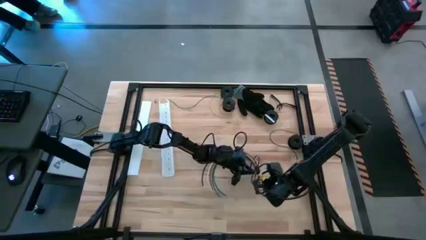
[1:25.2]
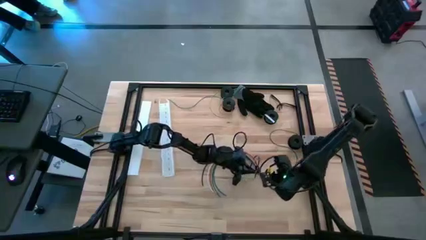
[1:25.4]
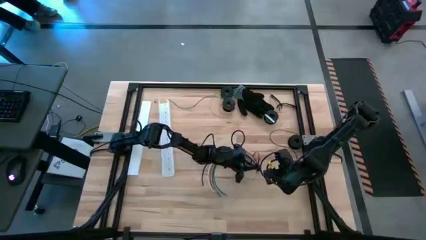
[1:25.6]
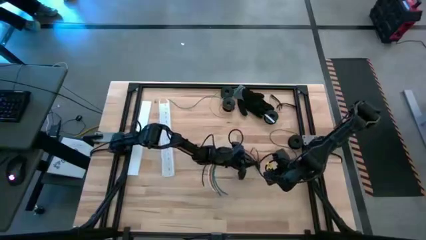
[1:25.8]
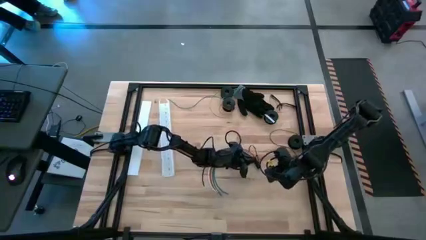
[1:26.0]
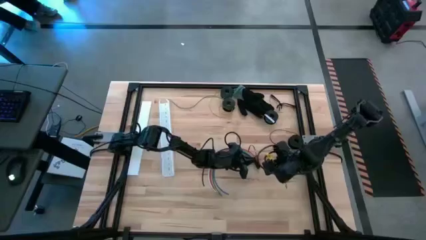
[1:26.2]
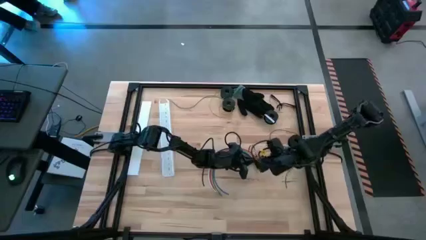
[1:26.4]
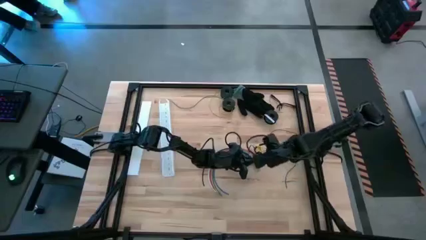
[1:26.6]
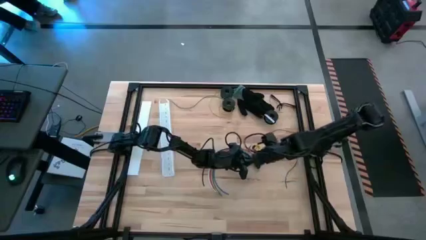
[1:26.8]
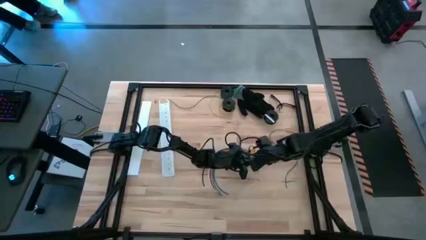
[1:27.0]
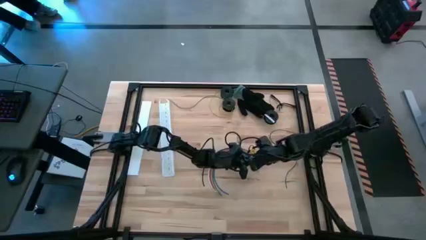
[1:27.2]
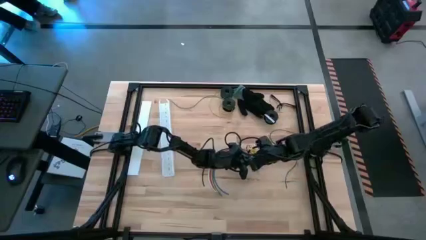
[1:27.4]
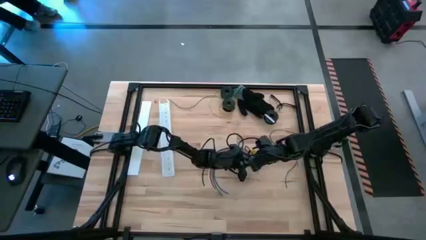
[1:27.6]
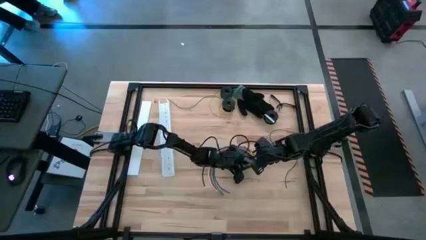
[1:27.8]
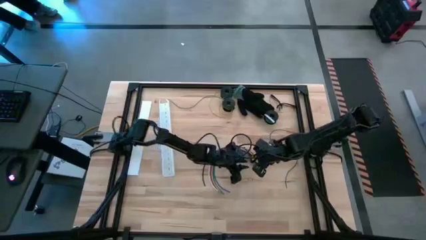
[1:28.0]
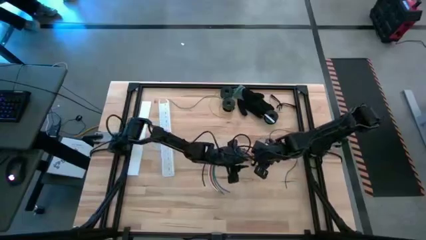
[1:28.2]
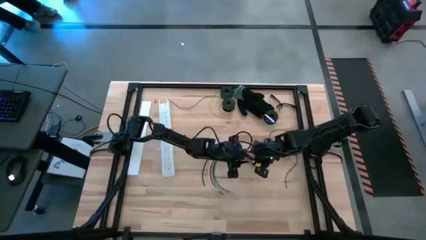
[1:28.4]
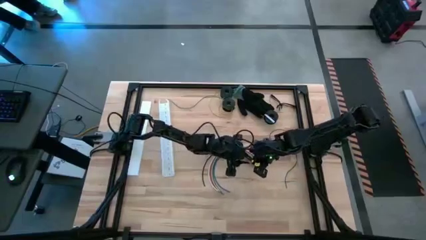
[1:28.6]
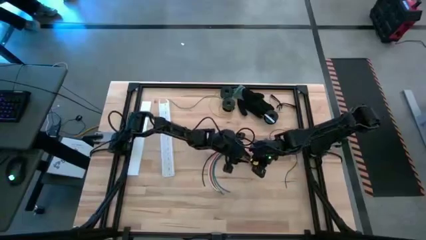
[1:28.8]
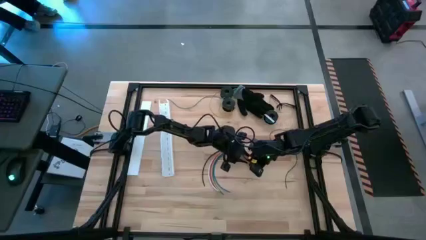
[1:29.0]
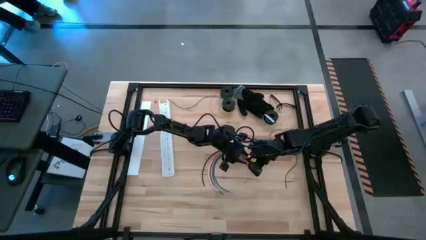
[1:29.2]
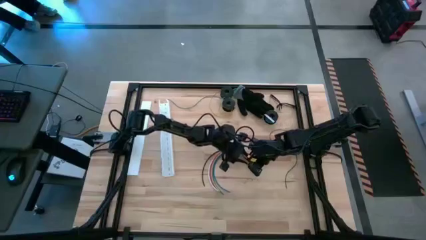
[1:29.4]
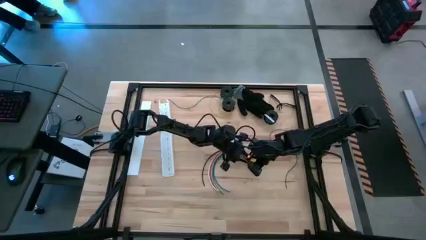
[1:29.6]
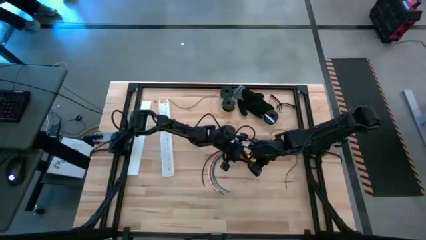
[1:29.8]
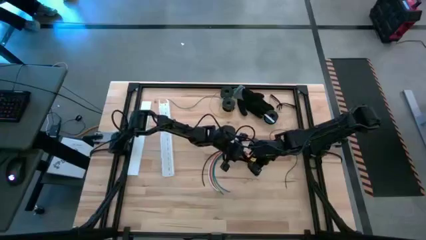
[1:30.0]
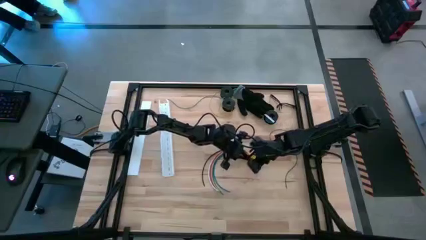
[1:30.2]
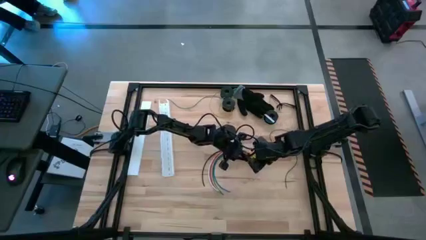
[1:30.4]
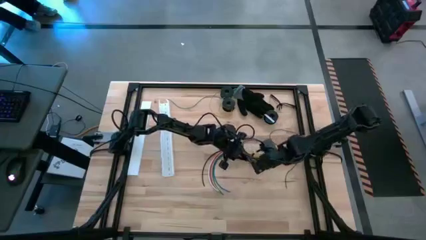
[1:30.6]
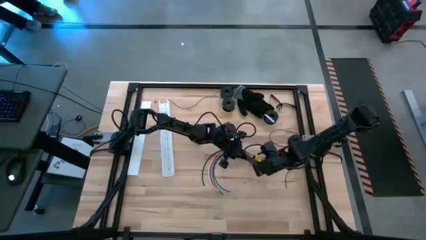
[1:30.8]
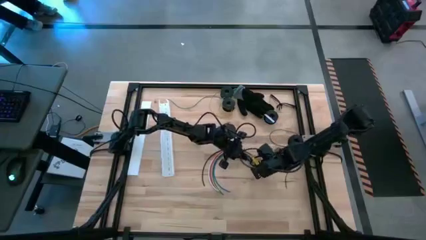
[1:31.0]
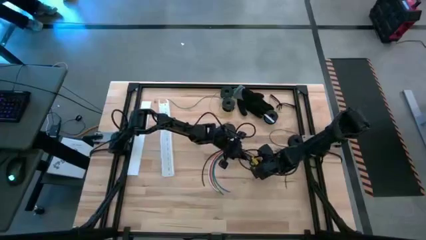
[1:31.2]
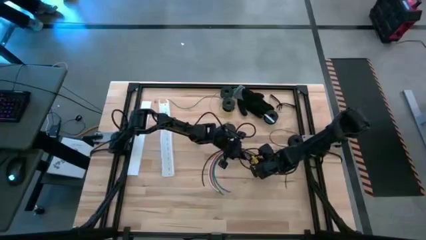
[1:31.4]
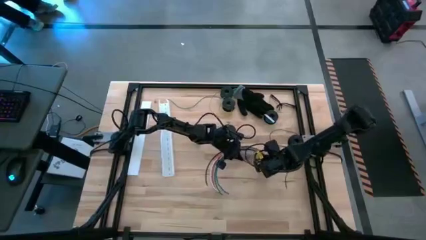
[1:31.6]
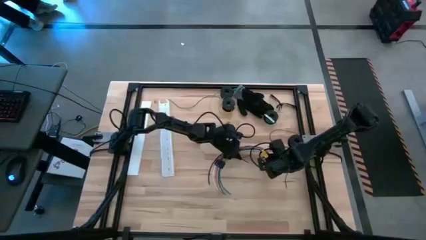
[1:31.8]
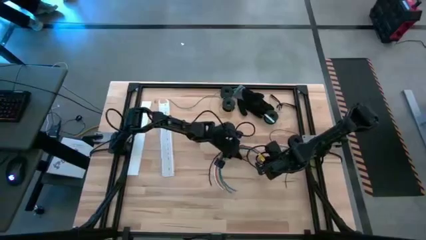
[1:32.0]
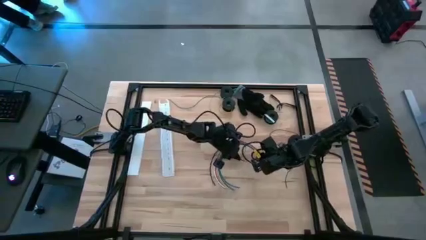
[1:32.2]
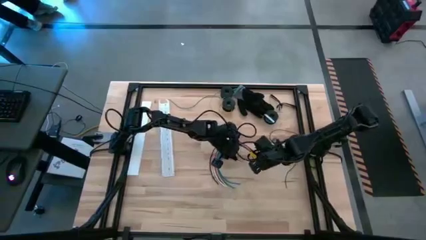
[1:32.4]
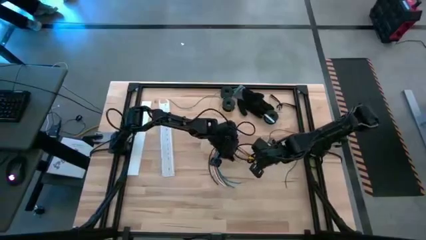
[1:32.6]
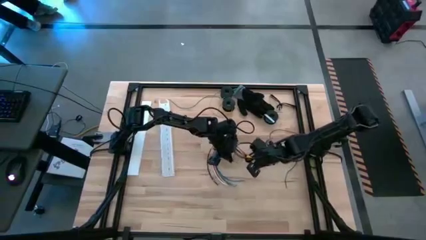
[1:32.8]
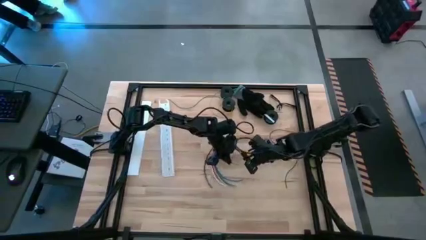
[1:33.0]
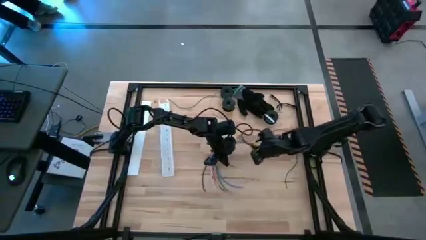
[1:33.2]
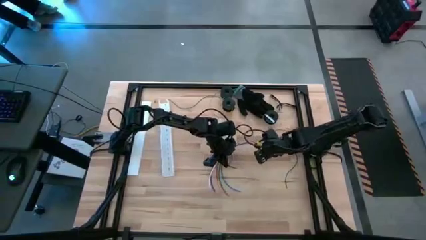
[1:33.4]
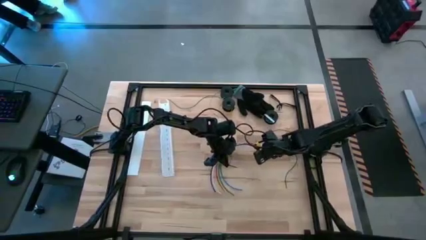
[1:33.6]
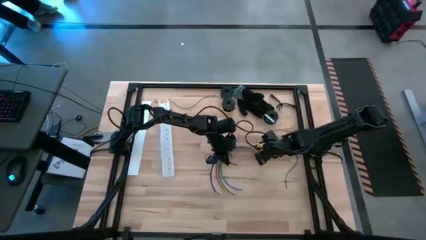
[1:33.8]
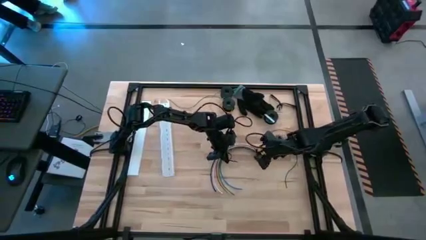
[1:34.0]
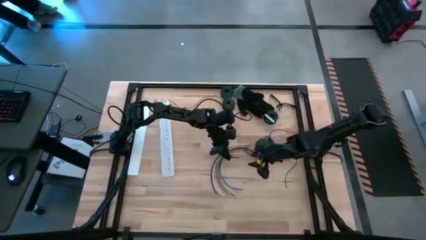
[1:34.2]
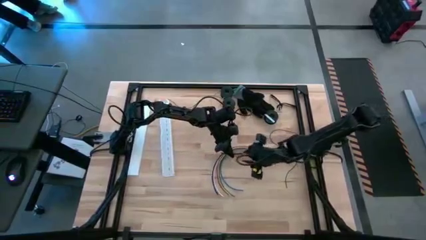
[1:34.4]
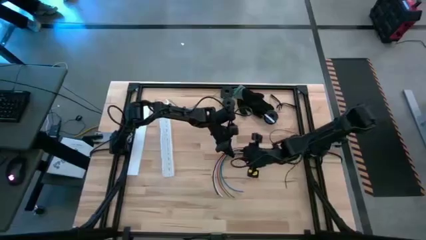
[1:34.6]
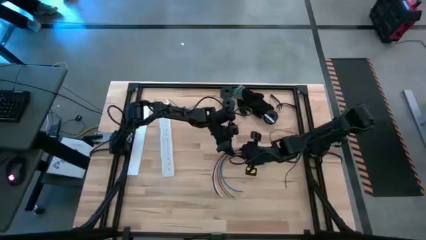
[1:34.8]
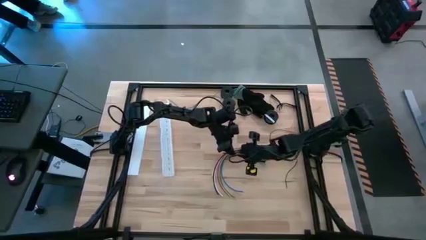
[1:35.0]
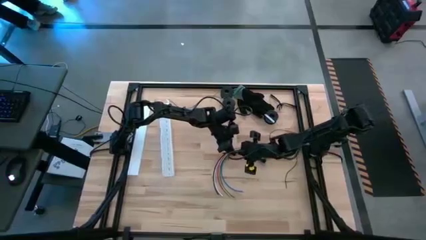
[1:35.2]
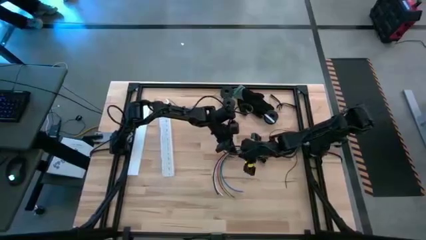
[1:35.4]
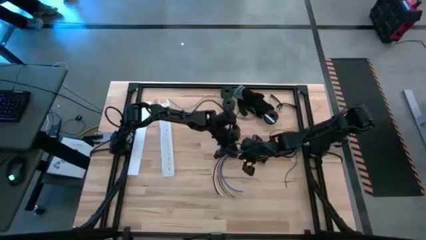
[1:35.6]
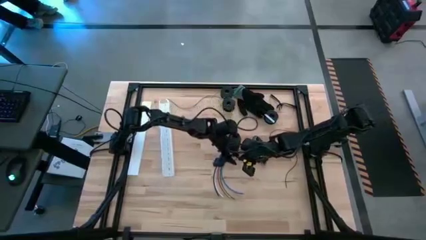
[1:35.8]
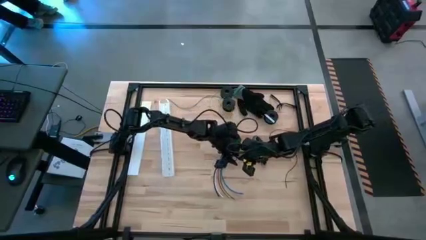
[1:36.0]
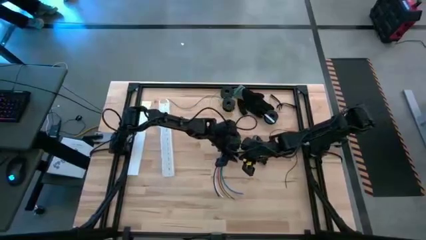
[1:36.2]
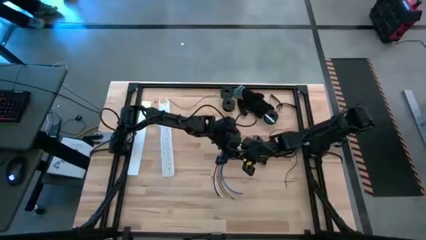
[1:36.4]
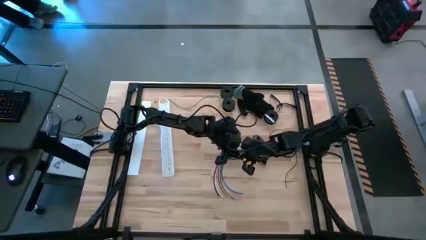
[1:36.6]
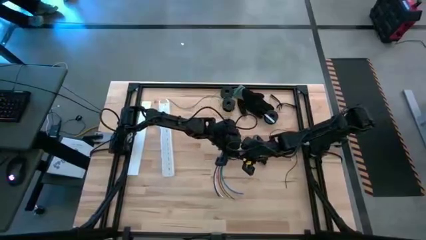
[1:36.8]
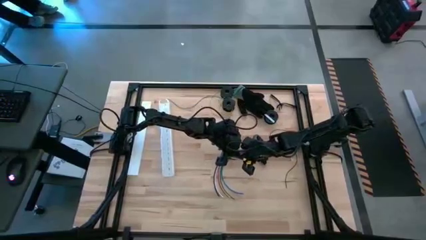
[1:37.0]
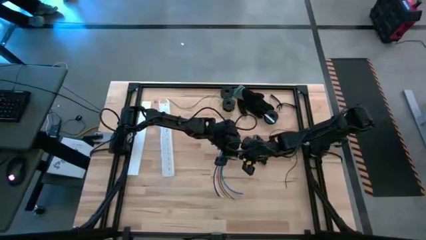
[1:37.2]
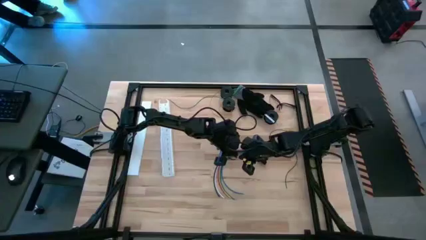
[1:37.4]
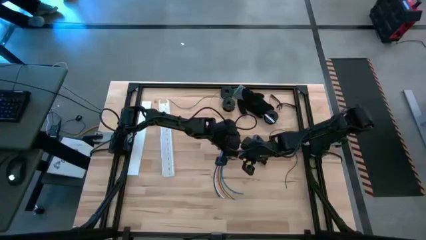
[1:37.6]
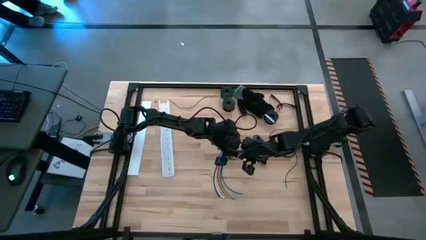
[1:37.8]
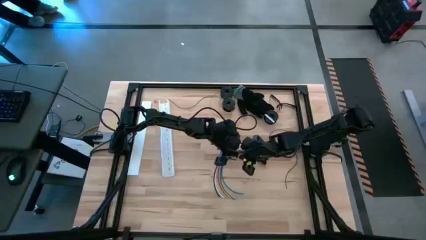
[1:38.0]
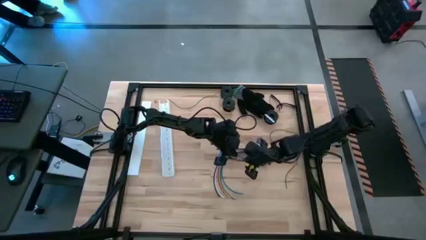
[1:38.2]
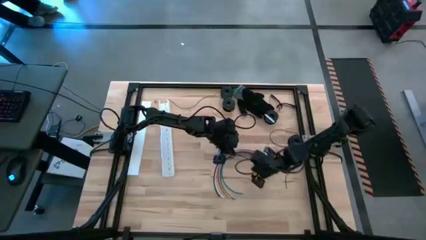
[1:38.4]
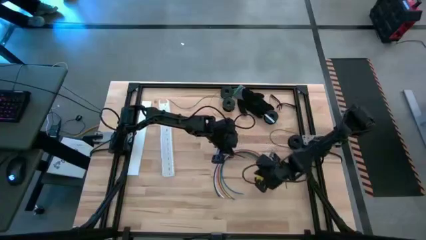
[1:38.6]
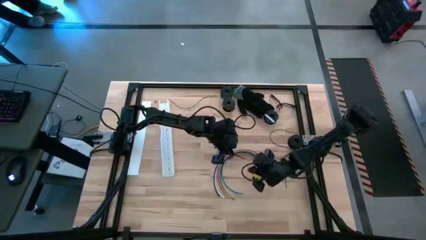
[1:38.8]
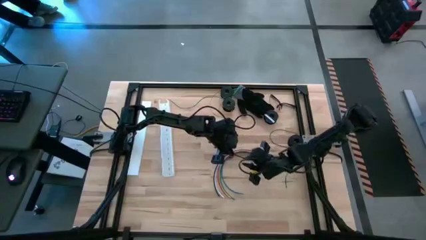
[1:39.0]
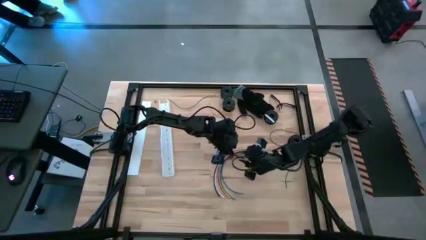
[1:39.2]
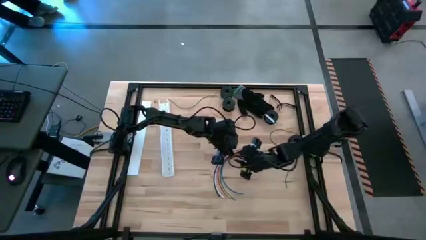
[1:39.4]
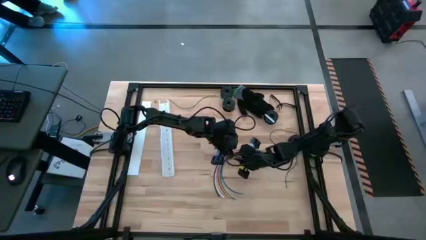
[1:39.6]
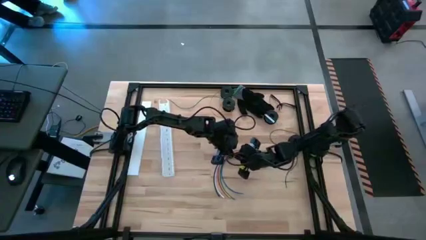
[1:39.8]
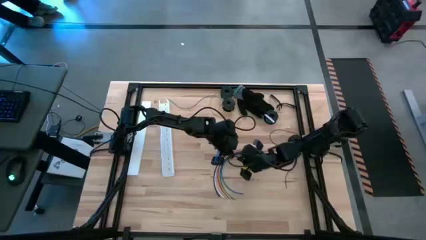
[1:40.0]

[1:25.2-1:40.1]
Task: Ziptie cables
Wrap the cables together using a black zip tie
